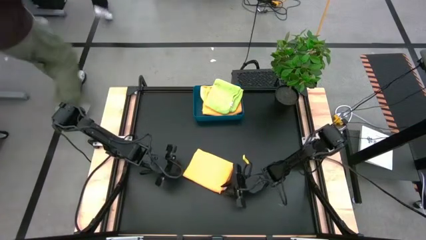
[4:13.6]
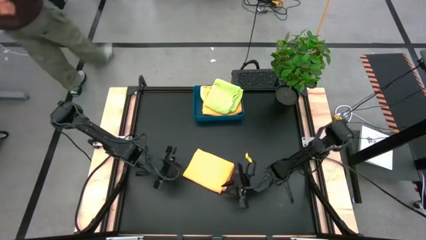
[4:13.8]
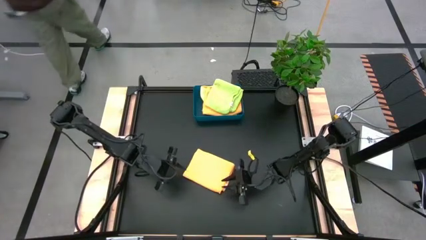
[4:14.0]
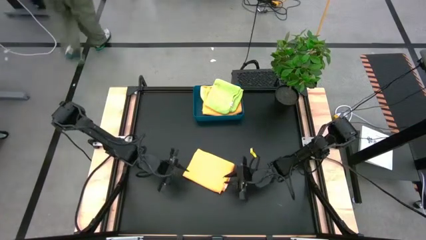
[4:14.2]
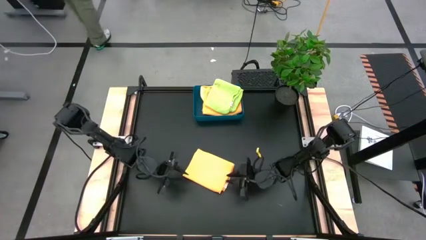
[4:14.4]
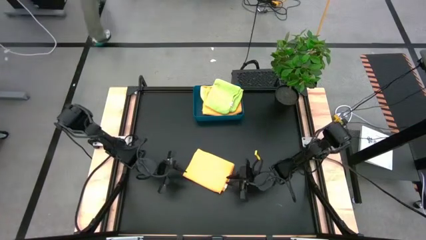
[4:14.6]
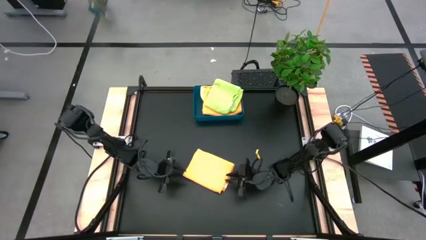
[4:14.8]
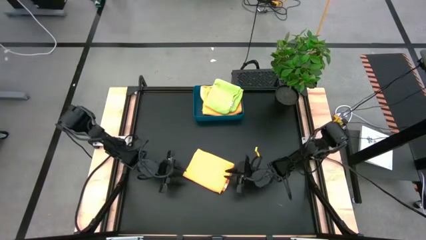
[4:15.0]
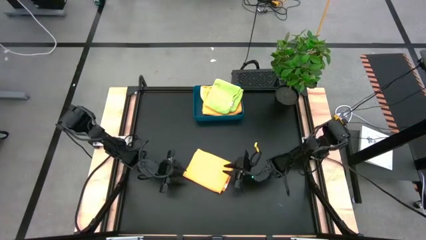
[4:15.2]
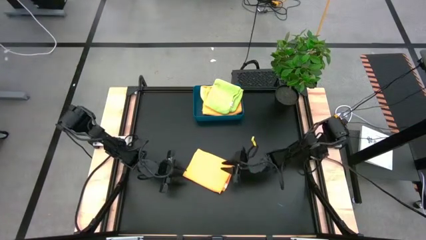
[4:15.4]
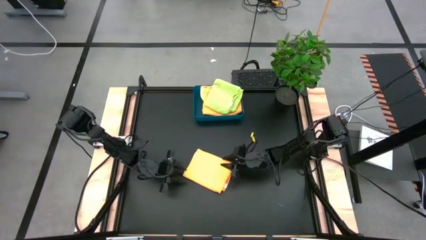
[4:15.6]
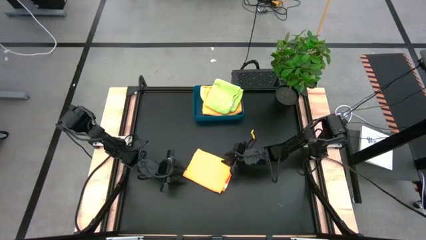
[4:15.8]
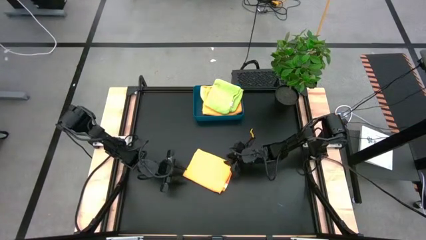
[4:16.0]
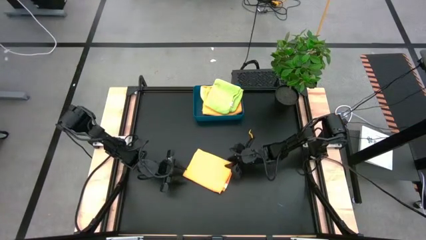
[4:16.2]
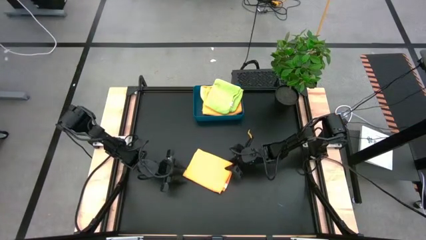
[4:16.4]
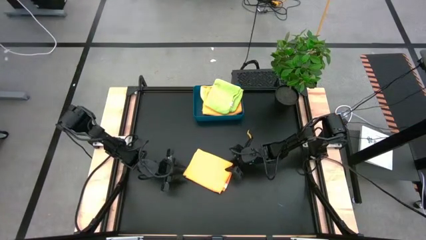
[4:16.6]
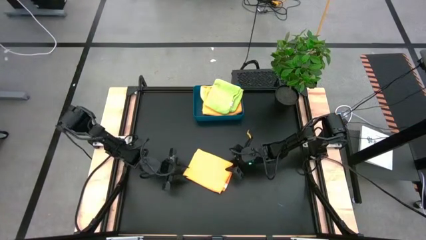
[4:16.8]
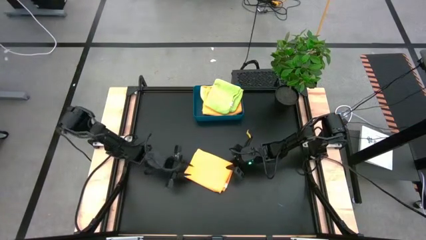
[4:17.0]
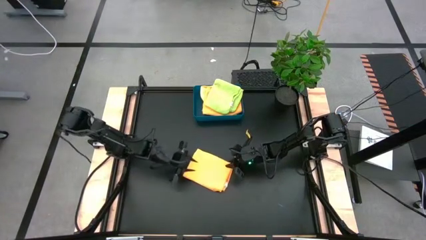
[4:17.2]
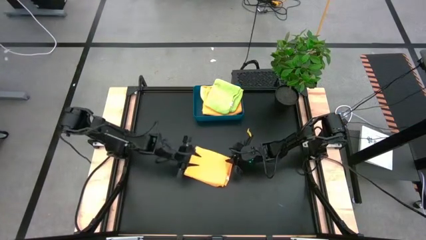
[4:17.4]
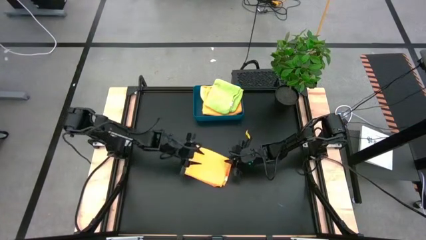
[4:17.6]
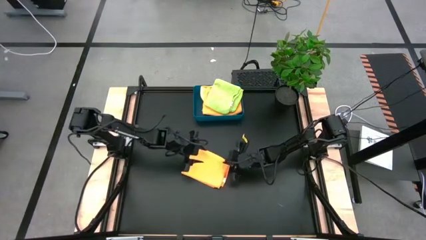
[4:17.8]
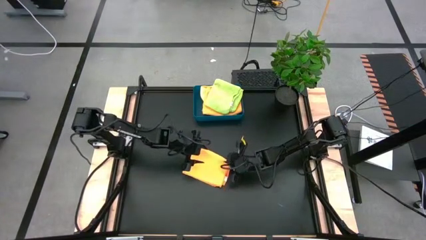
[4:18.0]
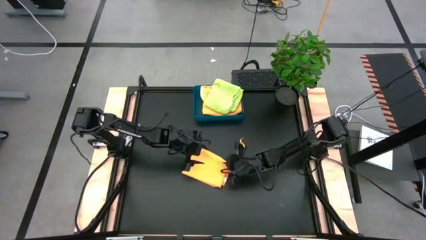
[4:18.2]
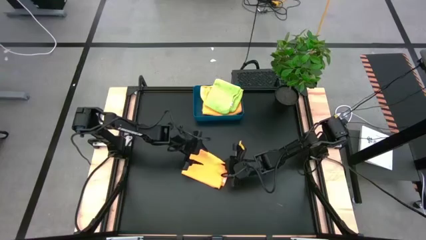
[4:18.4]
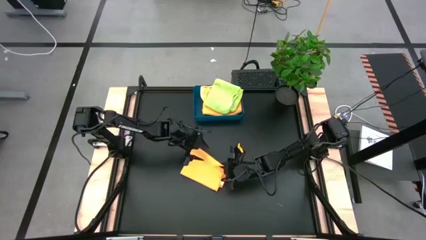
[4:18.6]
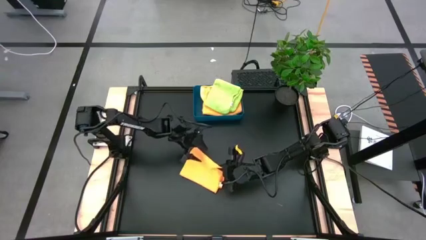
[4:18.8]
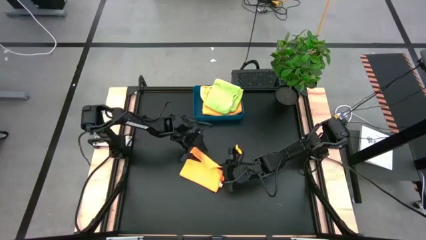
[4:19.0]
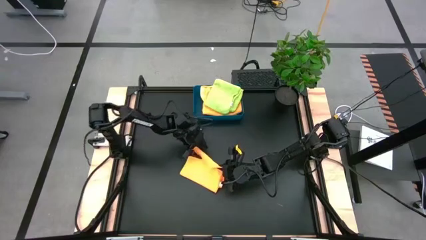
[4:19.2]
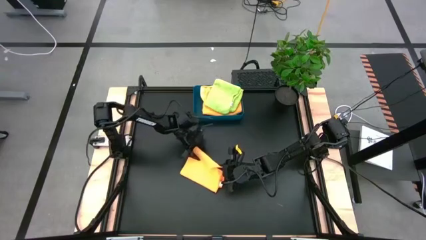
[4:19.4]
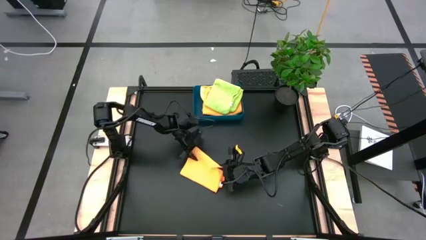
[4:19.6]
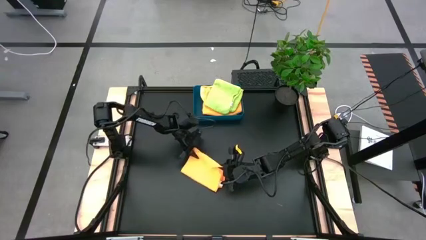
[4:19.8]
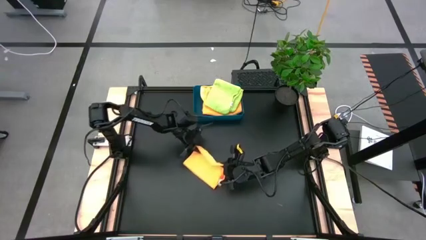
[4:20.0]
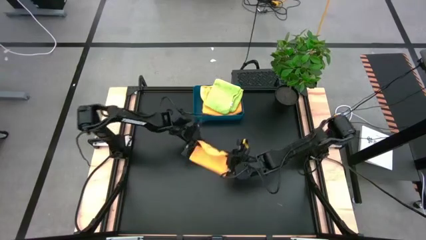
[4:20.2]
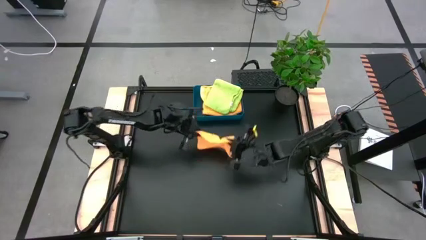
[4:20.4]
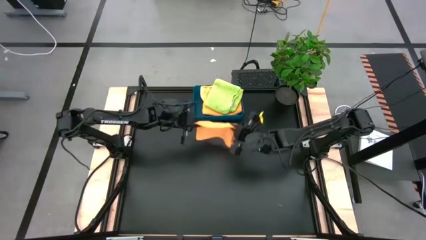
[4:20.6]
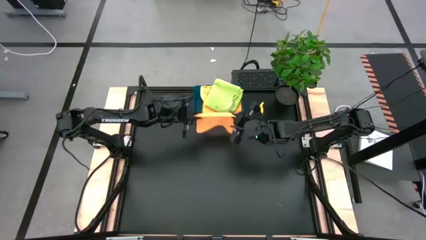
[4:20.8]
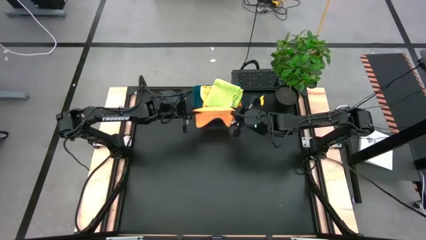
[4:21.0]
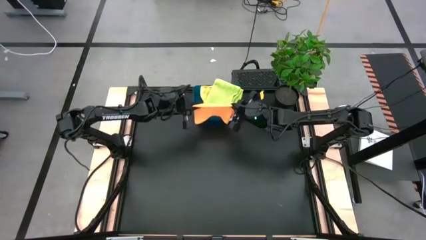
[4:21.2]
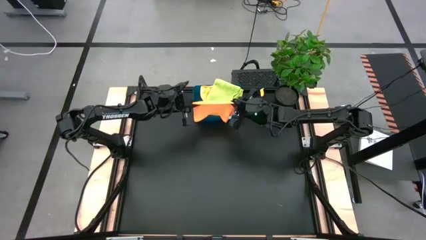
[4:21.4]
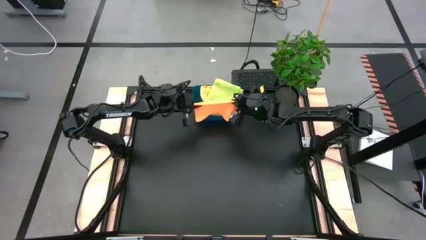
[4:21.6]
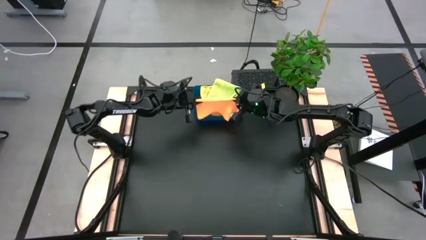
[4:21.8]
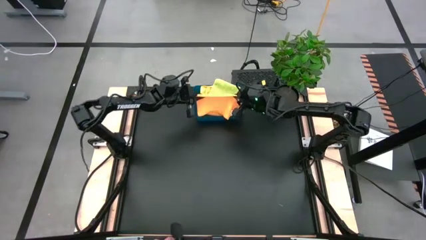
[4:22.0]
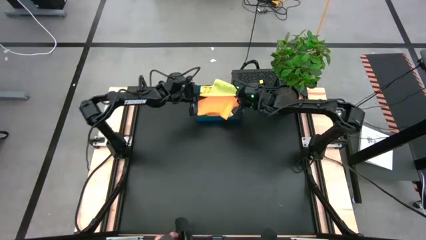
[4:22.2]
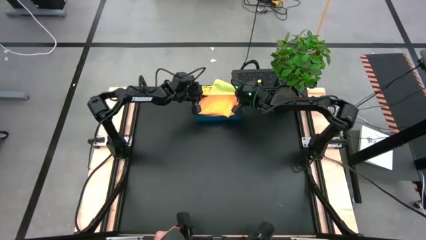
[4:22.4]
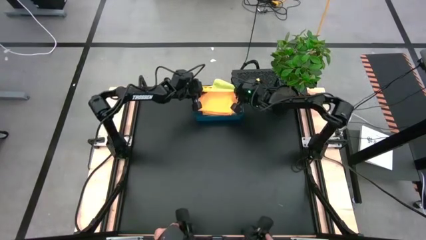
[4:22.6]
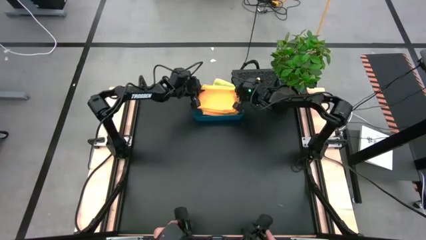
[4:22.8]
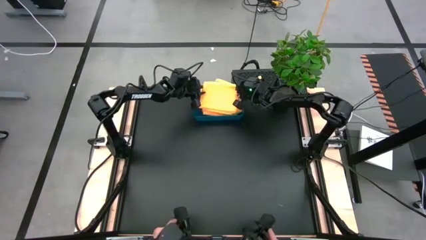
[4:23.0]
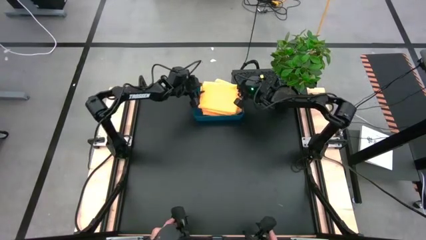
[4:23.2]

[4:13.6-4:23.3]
Task: Fold microfiber towels
Stack the orange microfiber cloth on top of the green microfiber cloth in the blue bin

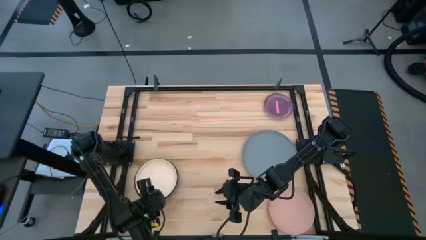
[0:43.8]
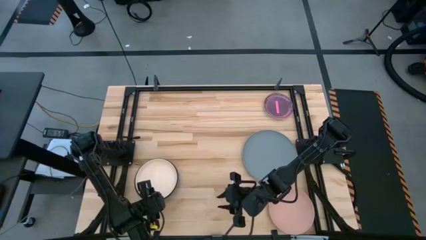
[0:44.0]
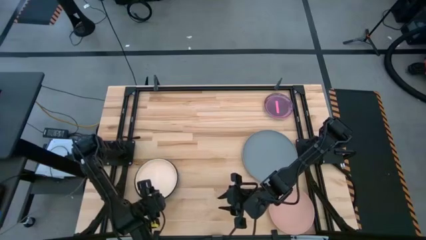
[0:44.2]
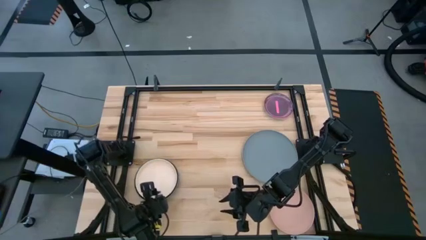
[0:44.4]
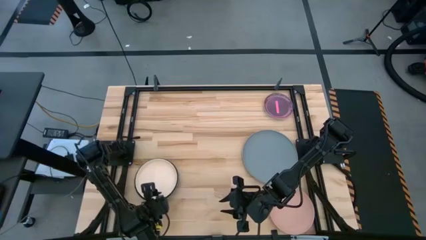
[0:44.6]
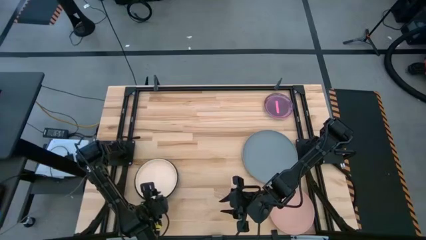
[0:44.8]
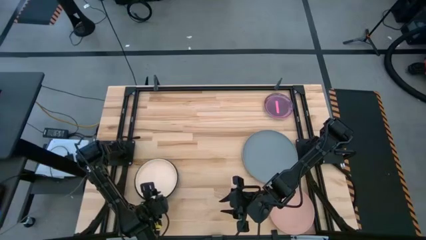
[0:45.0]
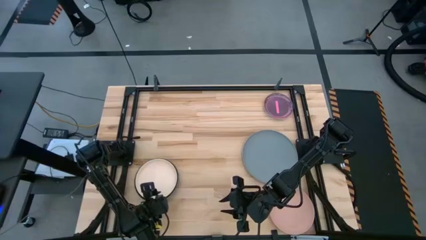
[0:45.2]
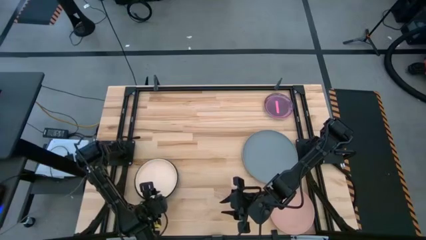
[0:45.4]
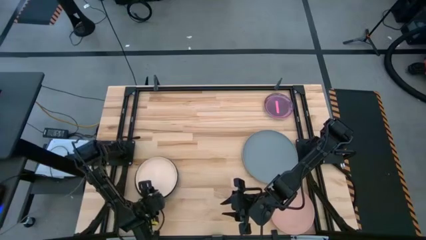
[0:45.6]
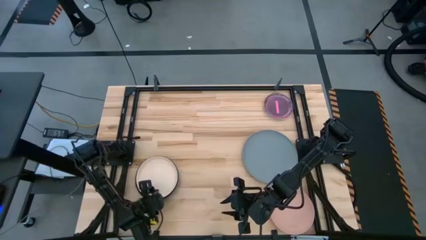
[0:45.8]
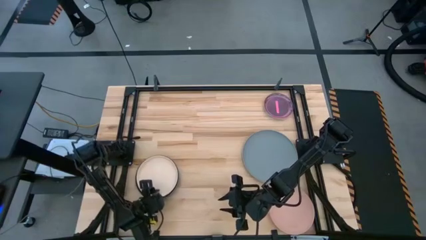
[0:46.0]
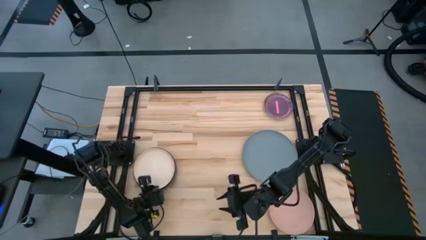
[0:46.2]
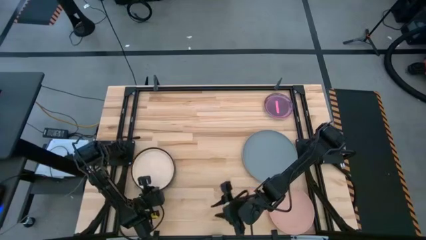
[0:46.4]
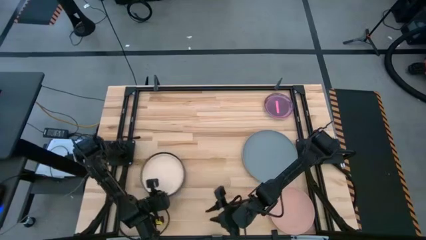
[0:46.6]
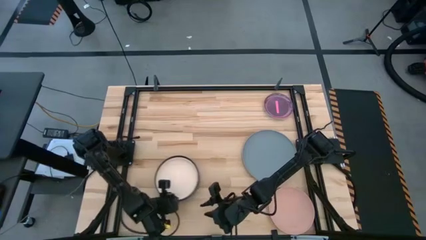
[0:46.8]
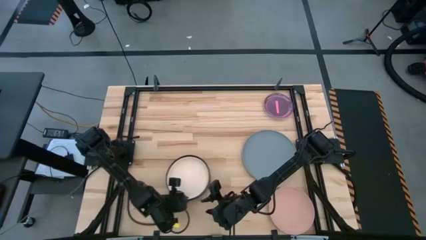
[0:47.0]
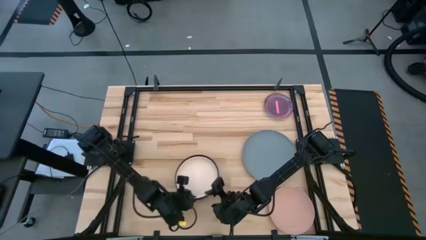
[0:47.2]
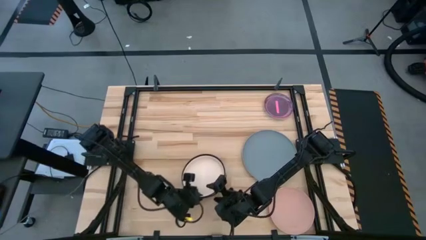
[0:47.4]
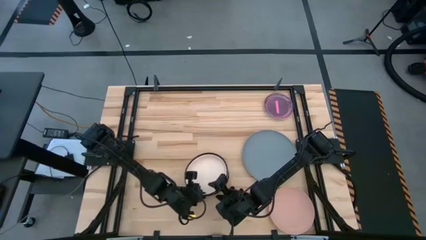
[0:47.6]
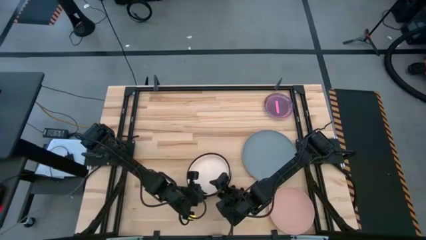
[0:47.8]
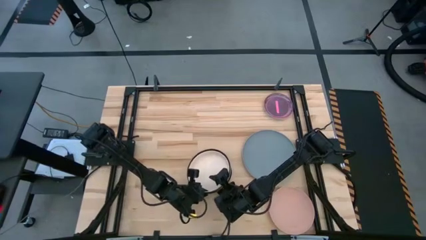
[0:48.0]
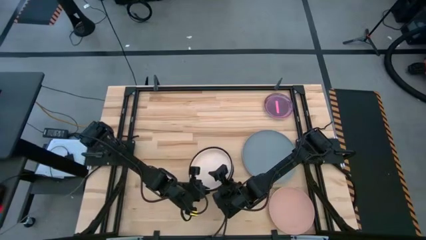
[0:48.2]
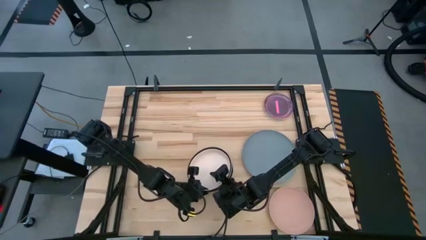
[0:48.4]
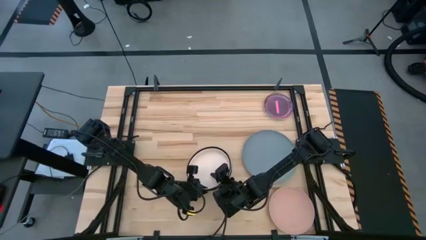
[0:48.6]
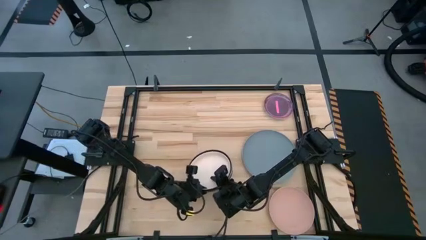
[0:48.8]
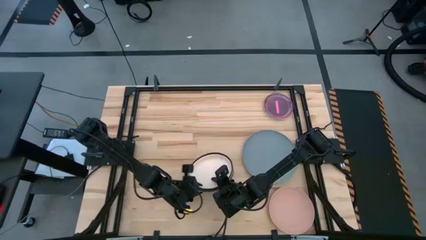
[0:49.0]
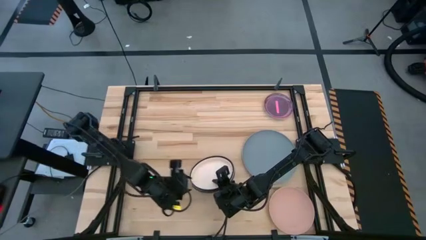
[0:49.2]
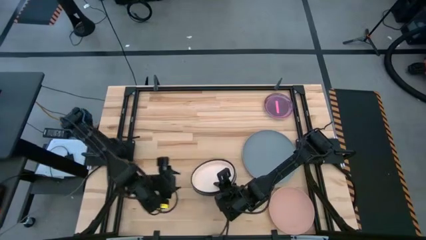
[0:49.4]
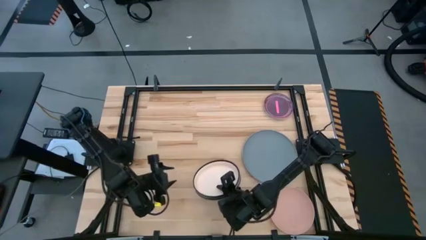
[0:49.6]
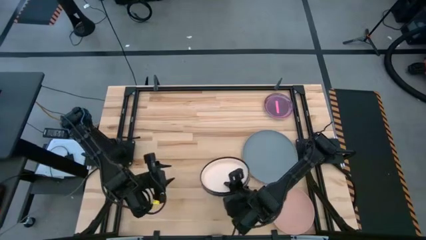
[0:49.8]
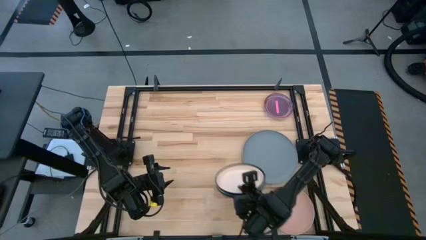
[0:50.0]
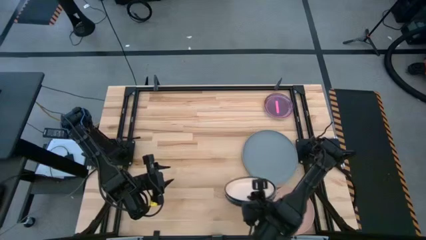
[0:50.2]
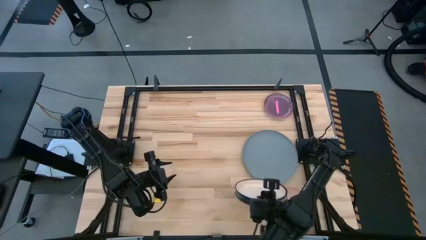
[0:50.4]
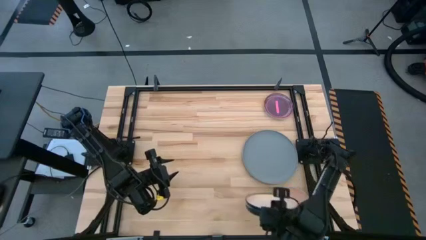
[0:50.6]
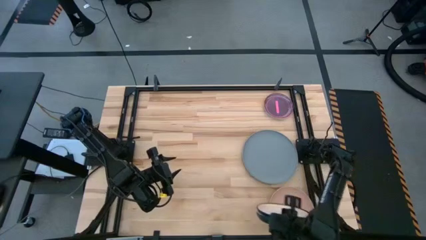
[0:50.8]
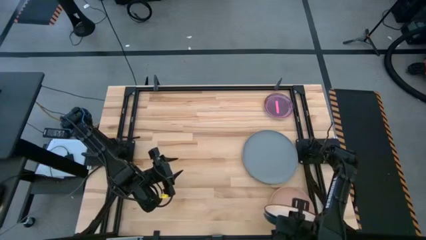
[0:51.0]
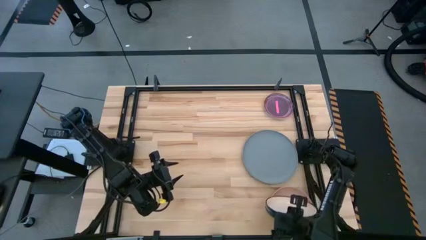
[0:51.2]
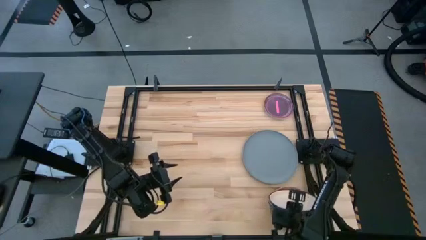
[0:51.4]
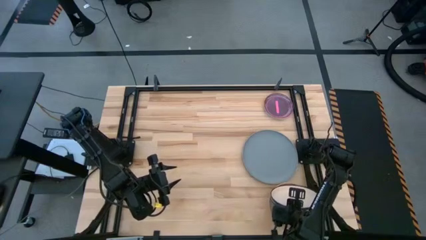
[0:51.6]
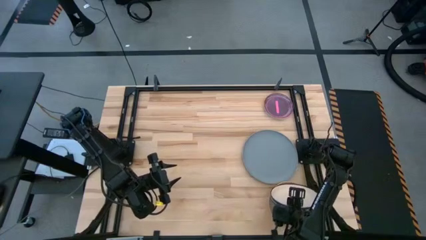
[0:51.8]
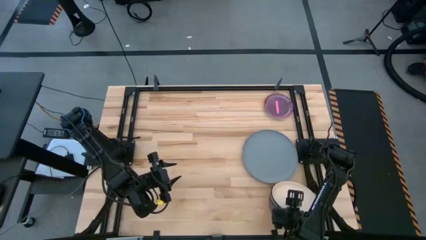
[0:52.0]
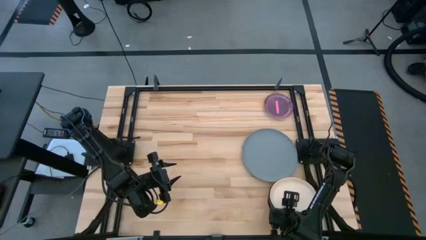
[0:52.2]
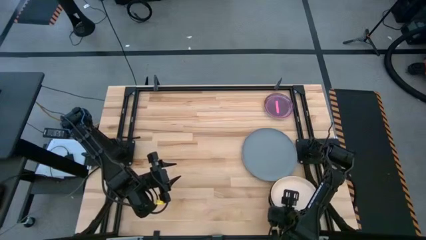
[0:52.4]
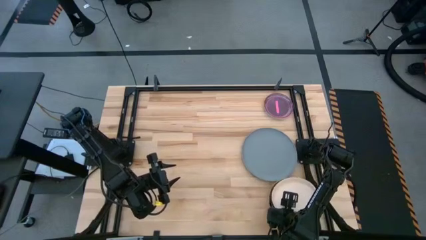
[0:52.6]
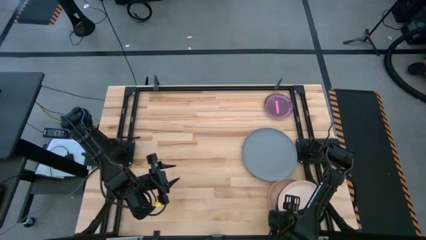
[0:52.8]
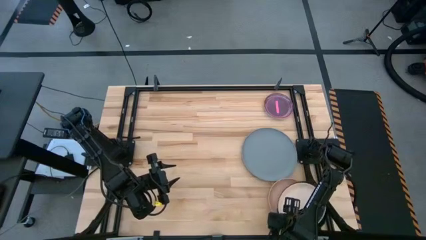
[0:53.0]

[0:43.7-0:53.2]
Task: Stack plastic plates
Stack the left stacked plates on top of the orange plate
